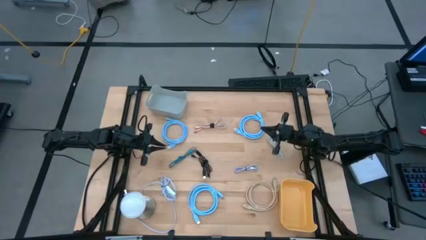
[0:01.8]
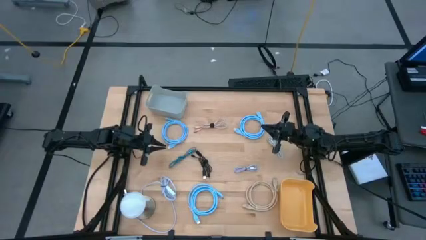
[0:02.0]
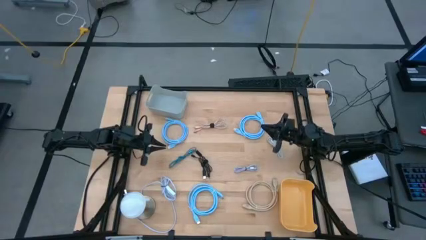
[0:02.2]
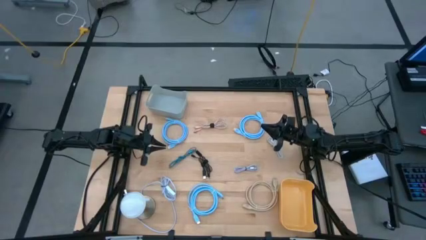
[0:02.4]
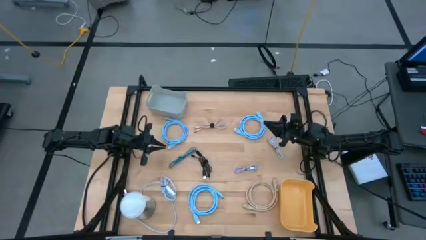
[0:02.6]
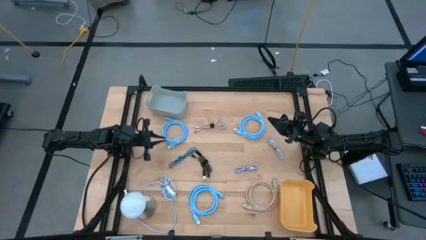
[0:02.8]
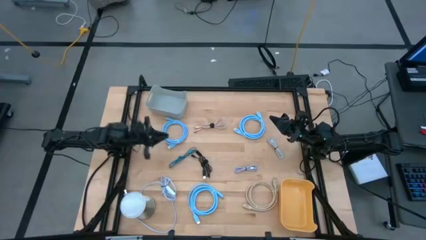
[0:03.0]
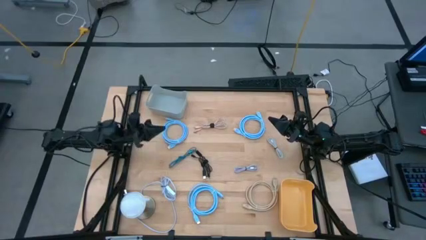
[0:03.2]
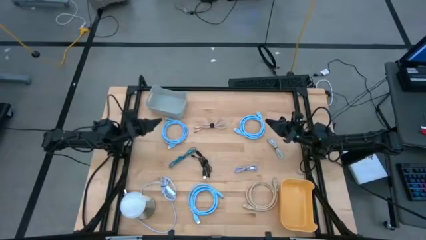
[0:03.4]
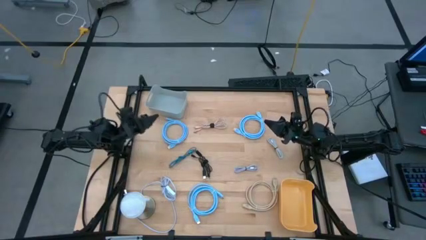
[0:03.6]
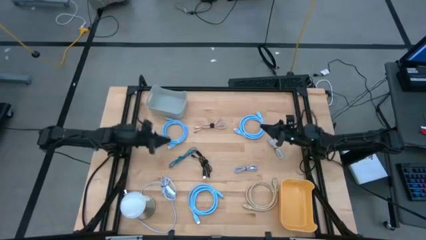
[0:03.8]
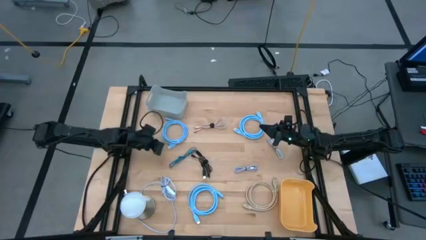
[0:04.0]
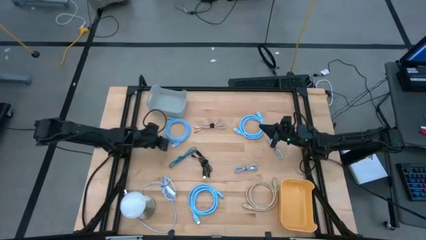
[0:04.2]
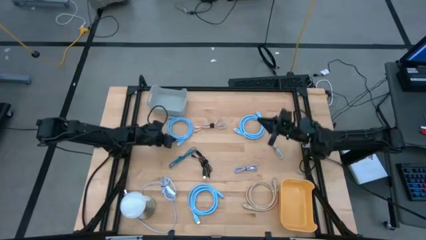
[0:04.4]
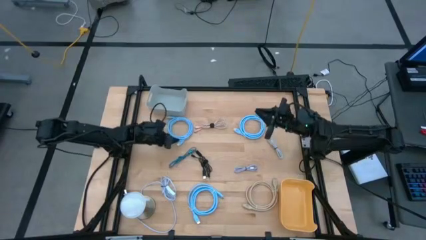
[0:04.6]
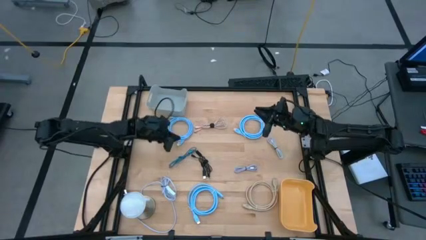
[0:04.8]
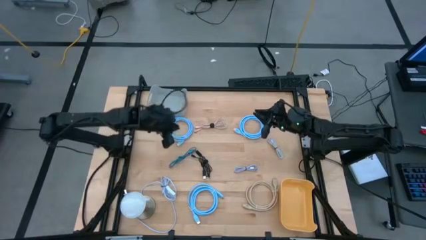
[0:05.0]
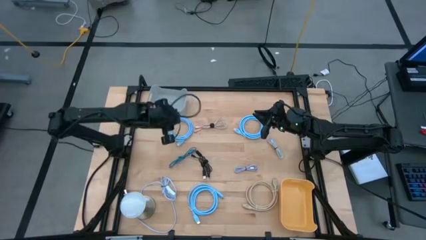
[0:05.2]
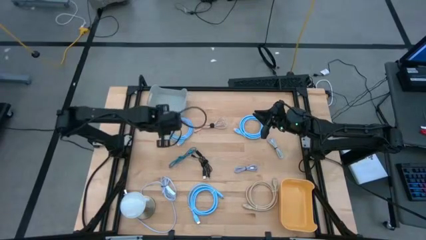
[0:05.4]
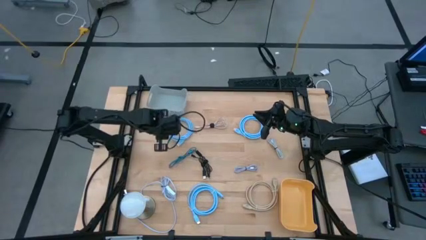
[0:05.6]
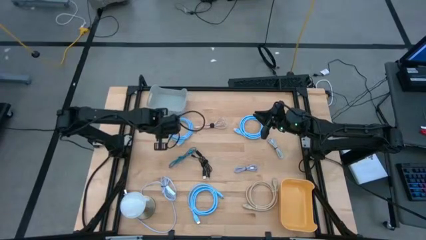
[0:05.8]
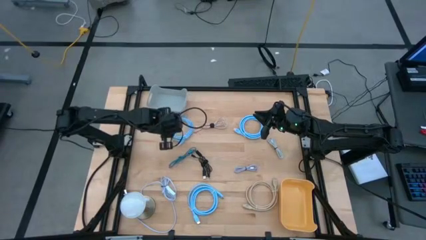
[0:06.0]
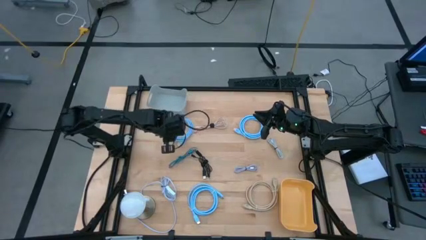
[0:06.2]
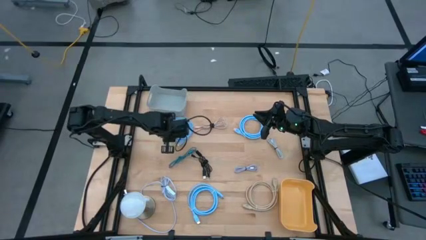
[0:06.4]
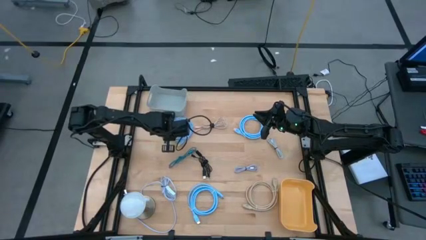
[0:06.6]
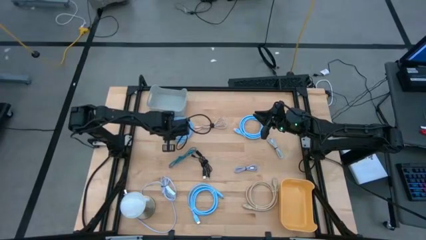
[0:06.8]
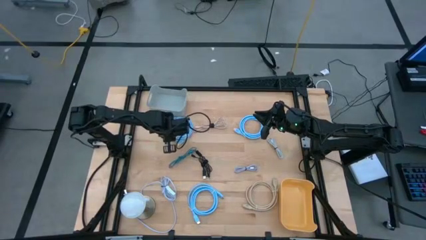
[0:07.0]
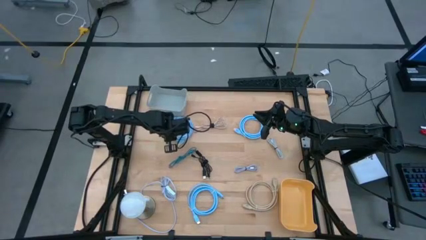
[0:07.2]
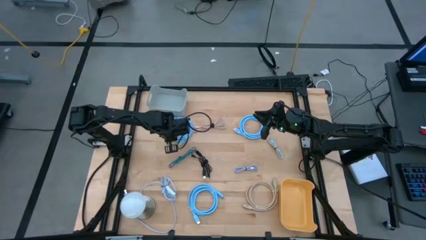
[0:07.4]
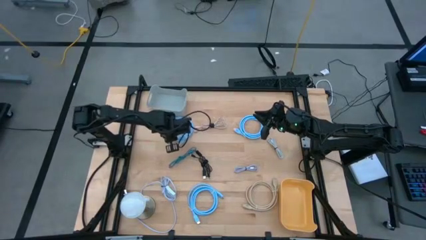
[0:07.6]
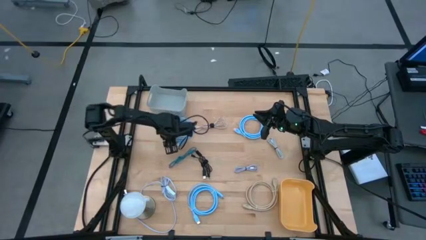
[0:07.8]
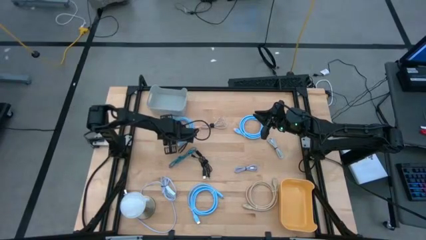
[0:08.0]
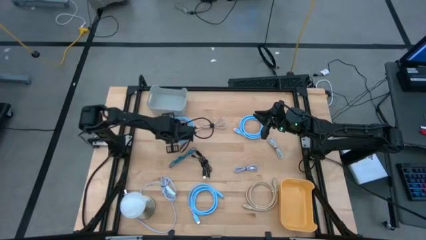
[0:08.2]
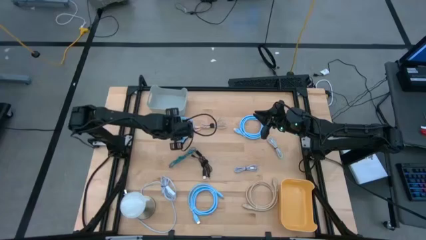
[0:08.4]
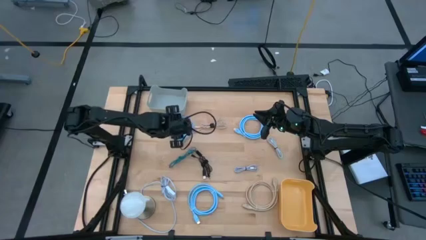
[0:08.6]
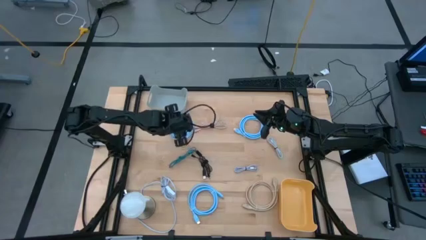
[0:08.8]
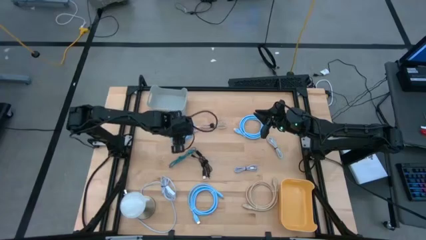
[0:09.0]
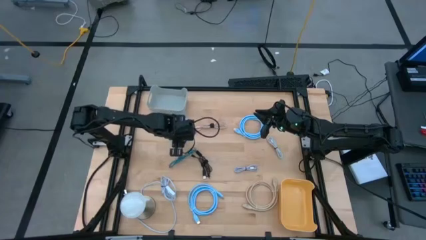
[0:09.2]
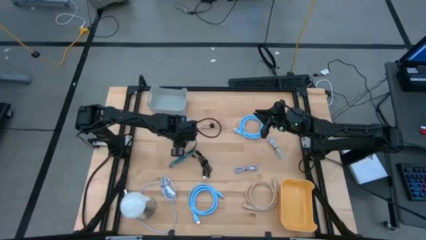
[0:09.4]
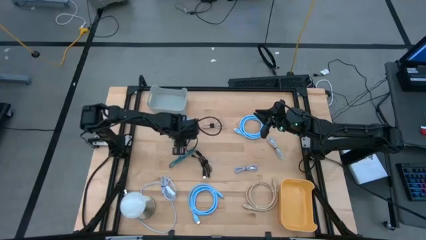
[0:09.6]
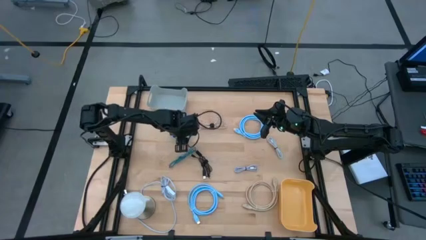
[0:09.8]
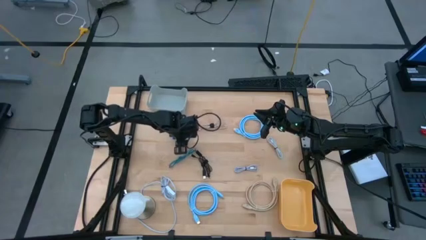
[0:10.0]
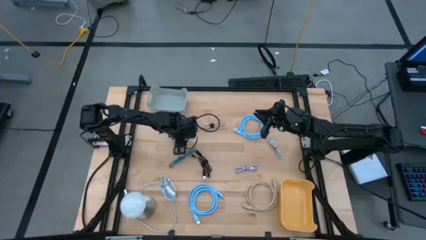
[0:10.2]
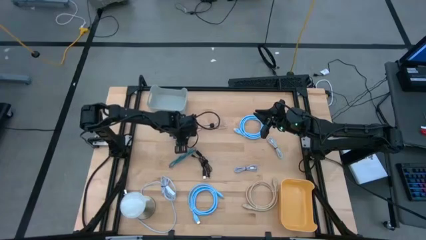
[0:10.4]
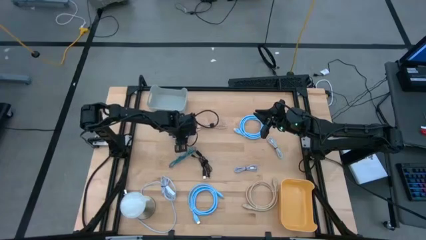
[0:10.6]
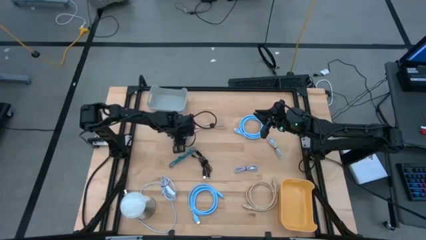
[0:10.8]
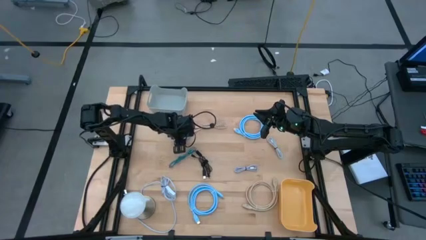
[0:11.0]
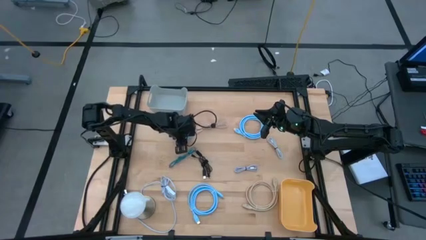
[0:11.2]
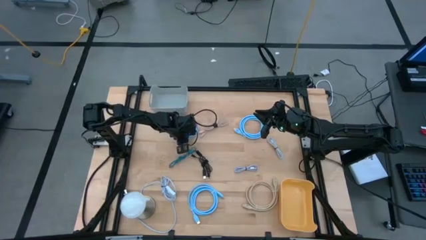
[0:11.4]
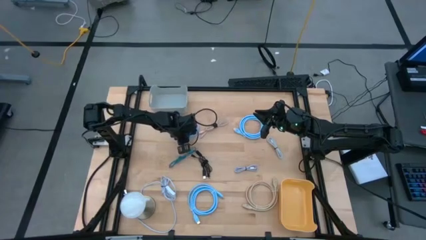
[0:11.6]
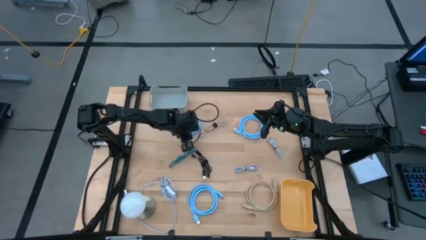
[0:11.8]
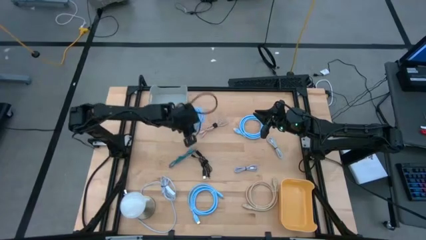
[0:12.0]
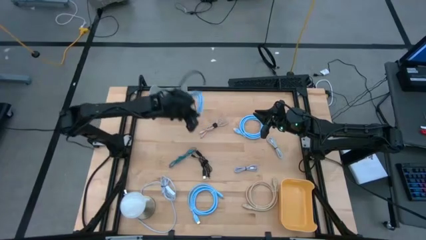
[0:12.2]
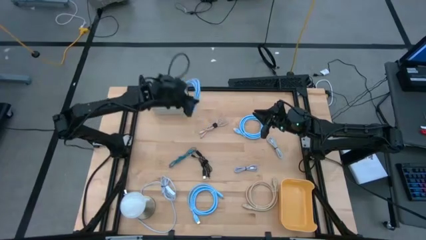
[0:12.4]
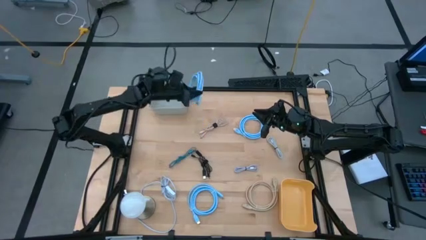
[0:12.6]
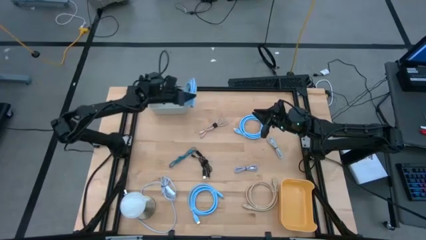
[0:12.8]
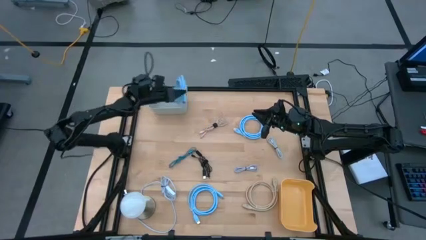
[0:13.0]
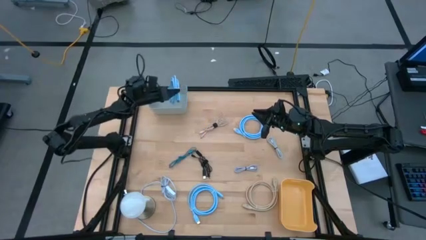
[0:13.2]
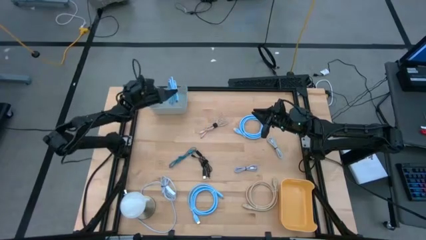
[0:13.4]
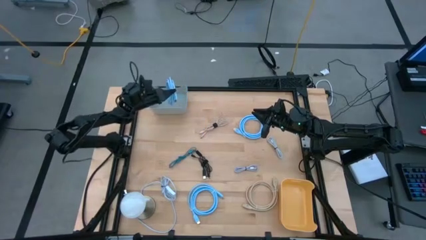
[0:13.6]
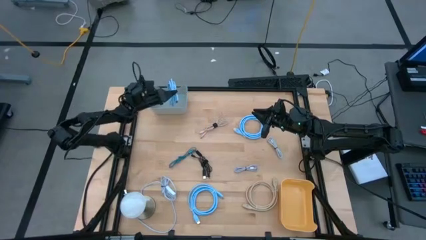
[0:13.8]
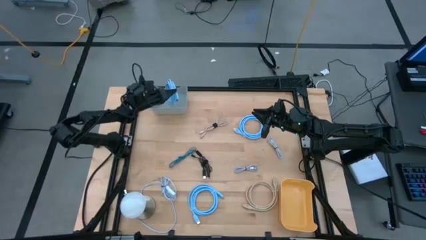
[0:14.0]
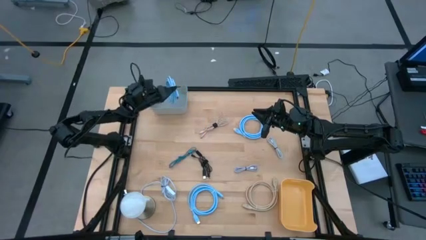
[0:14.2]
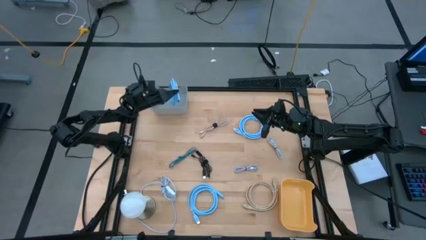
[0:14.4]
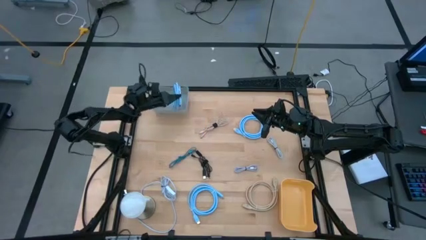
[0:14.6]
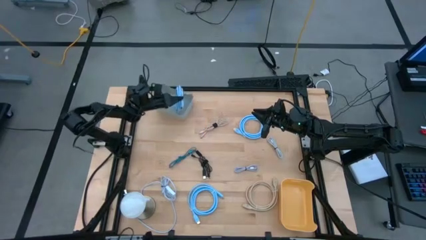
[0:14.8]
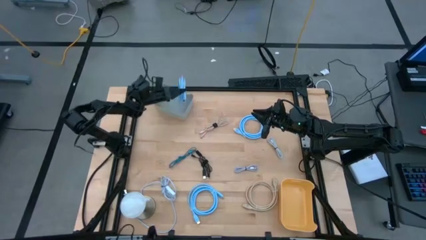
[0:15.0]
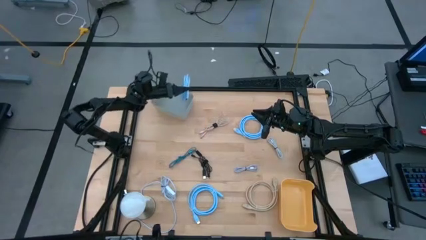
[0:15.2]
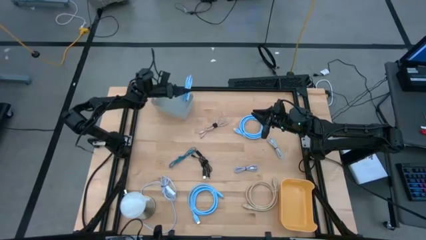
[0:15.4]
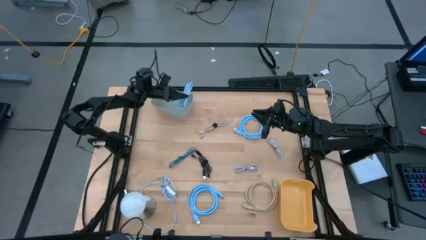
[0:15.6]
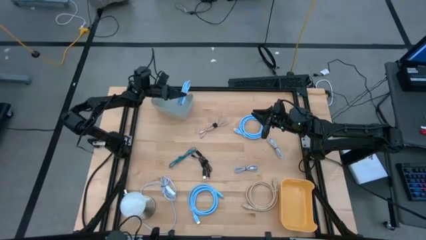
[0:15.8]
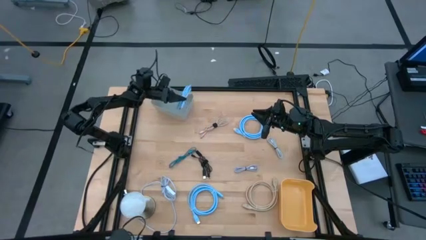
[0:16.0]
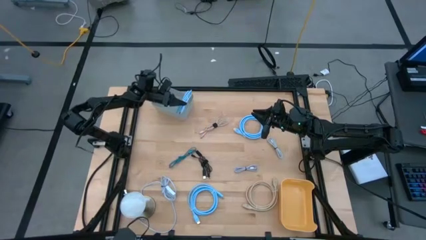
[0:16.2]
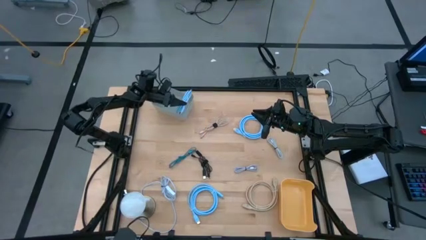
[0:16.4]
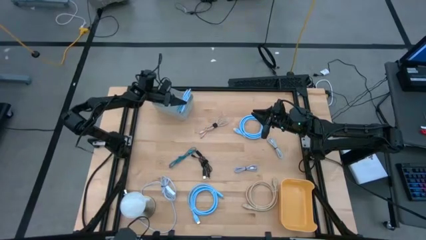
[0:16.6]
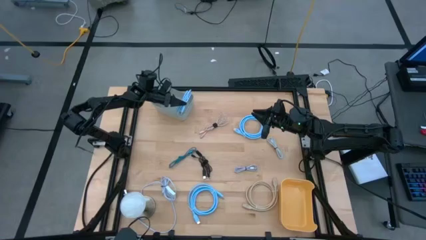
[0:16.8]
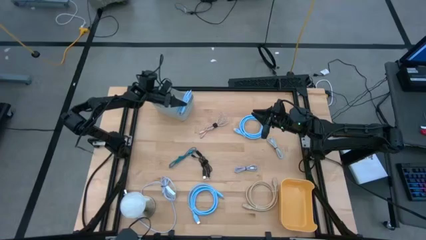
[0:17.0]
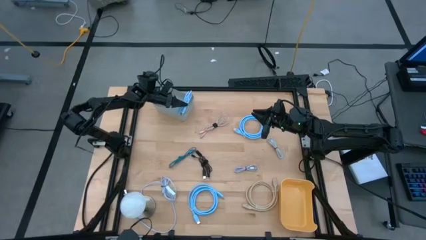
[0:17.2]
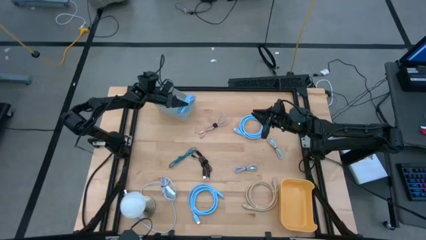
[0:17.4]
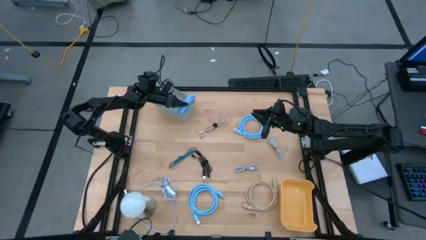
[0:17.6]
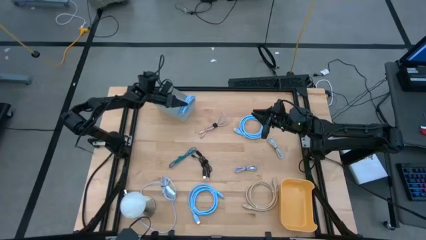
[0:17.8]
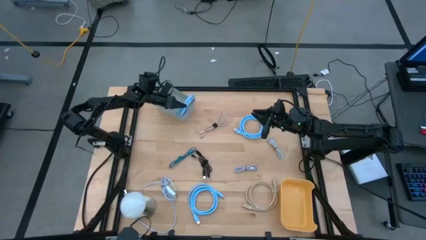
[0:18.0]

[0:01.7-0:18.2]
Task: Pick & Place USB Port
Put the top left blue HDMI cable into the gray bin
